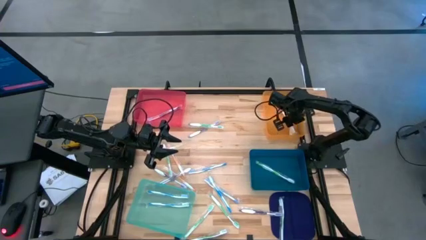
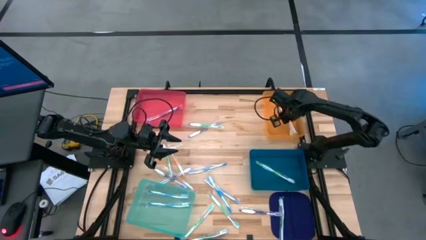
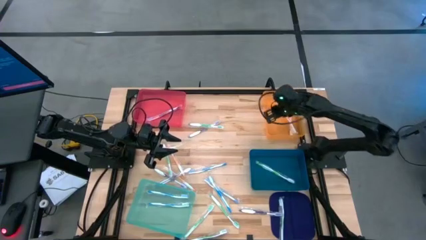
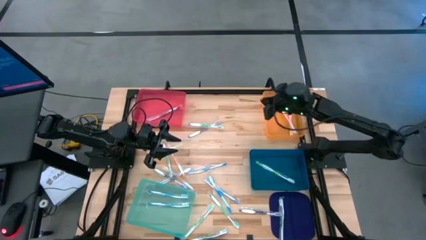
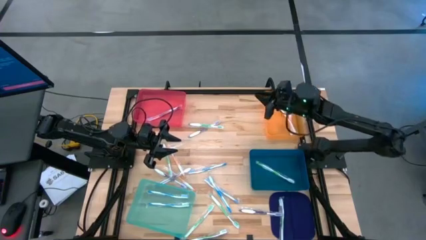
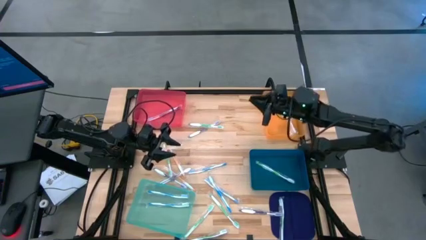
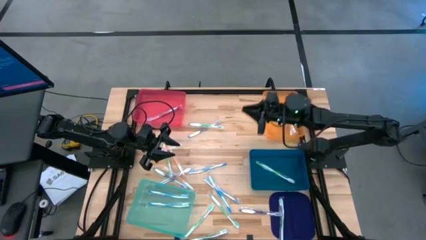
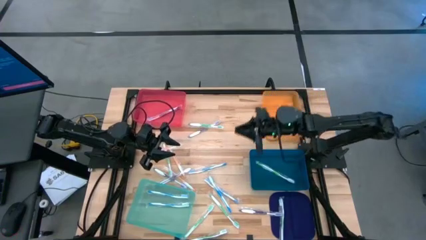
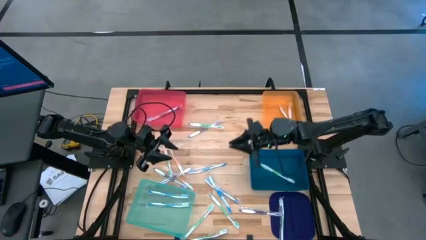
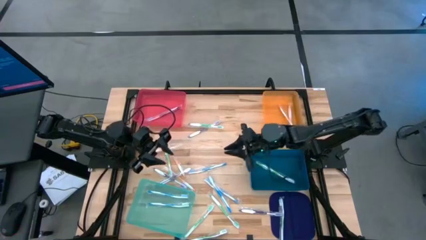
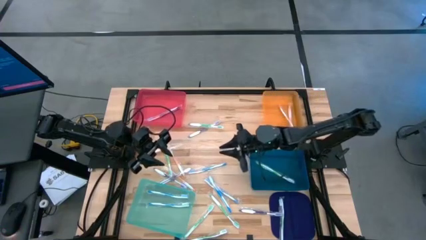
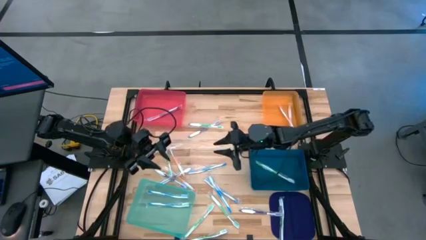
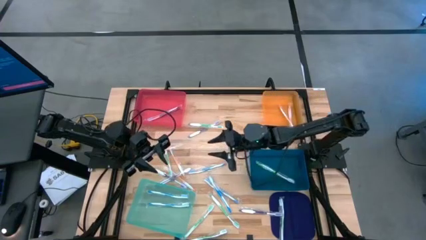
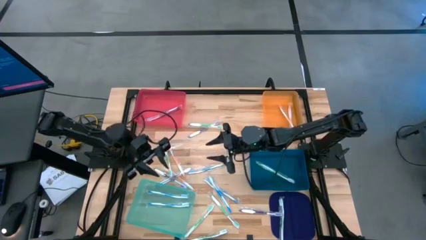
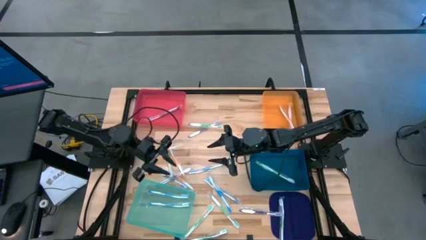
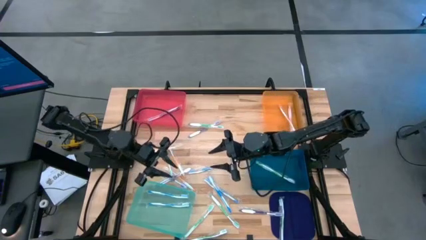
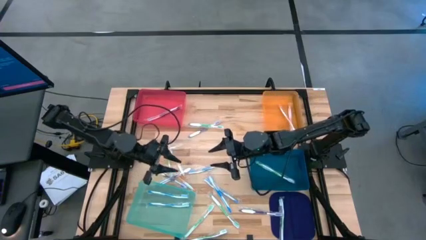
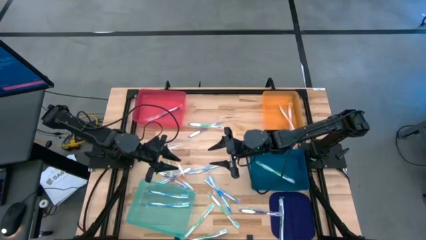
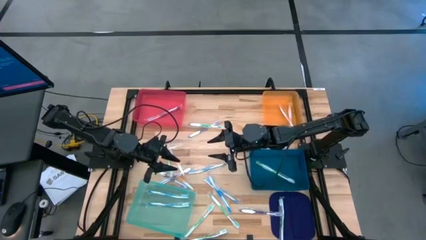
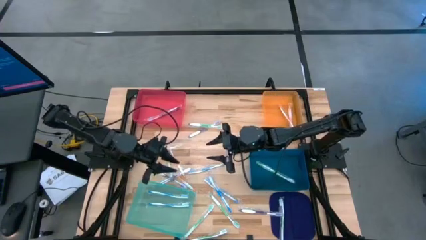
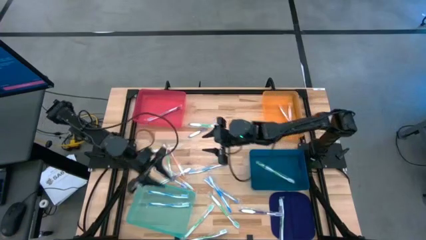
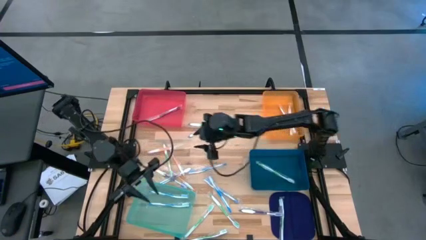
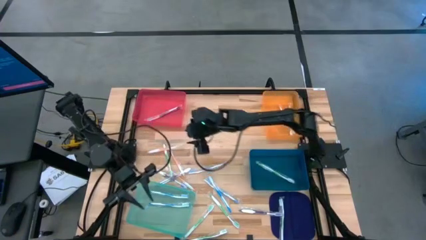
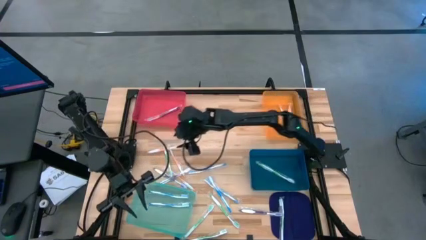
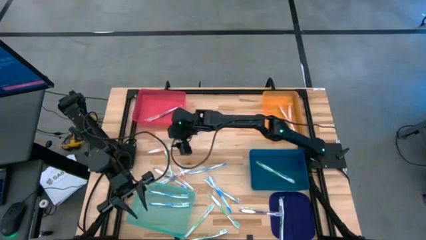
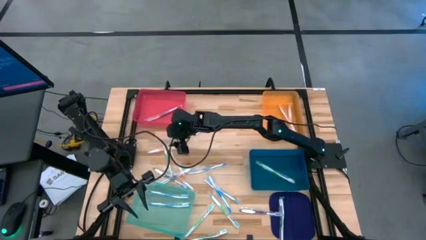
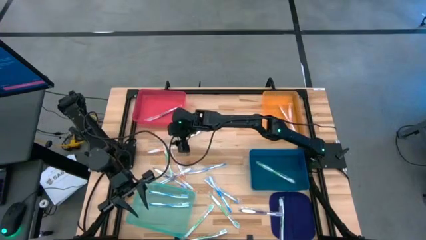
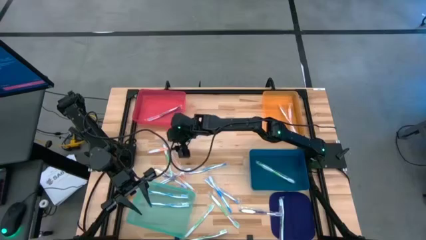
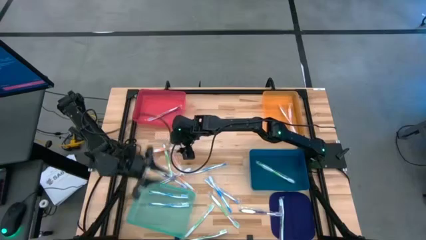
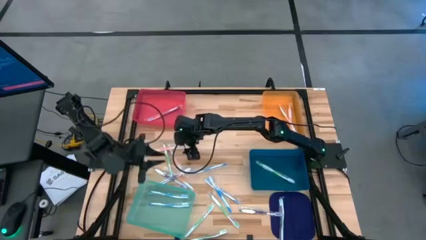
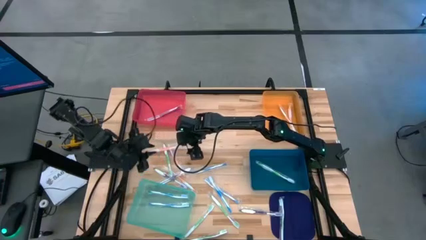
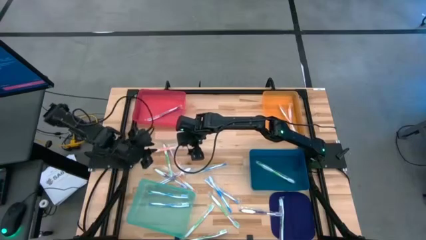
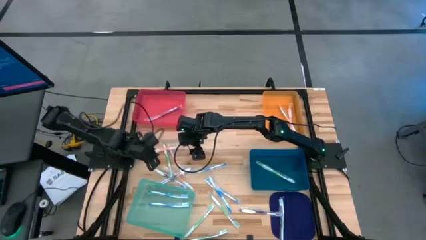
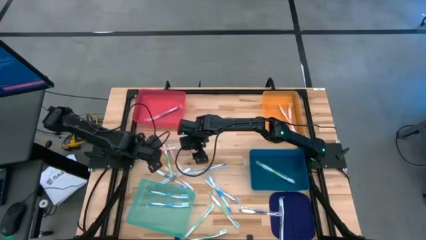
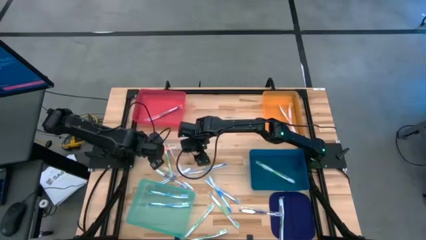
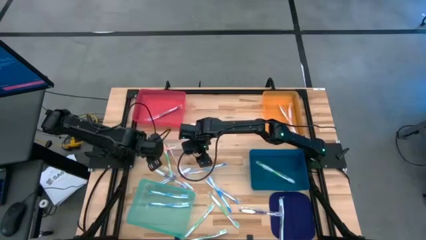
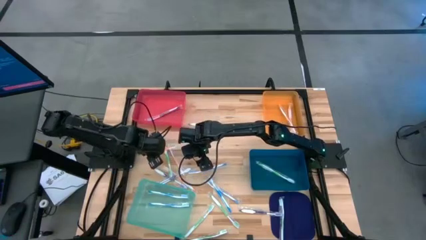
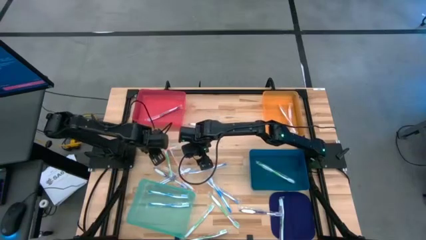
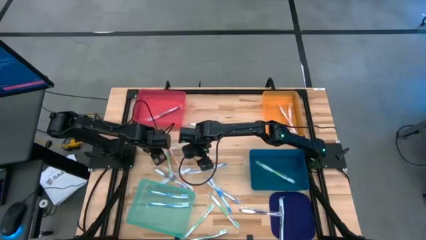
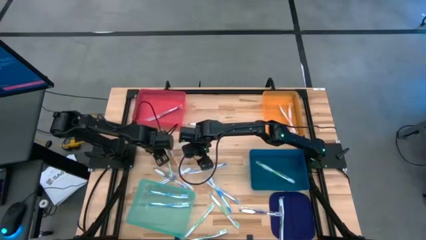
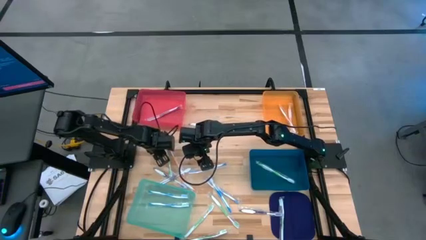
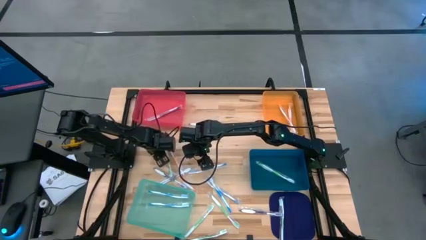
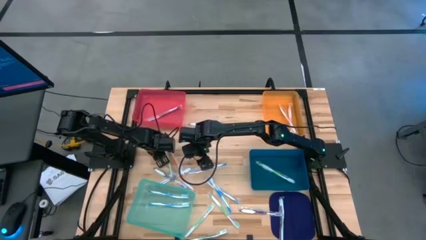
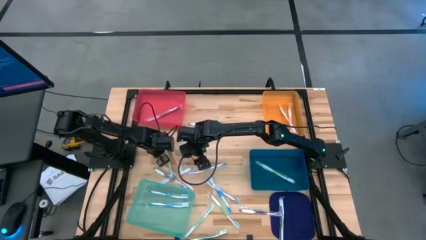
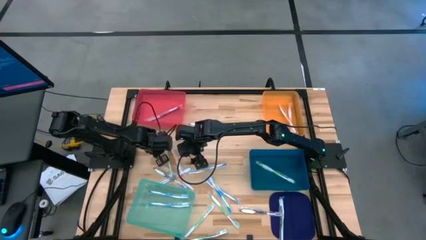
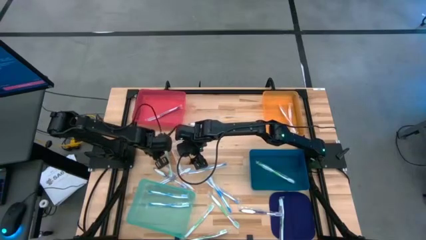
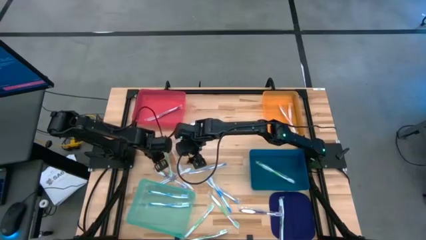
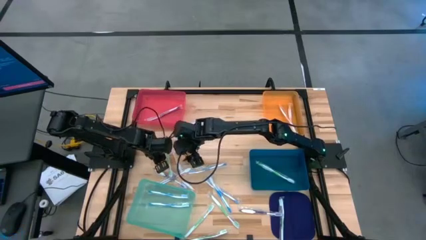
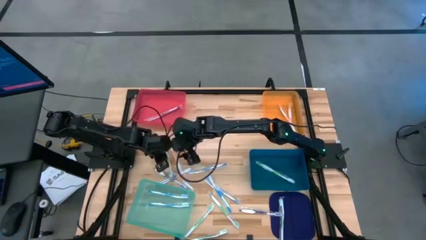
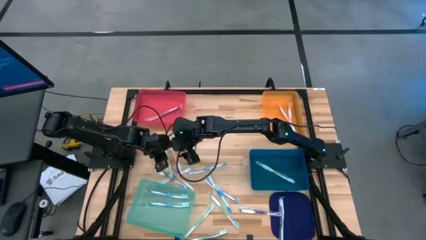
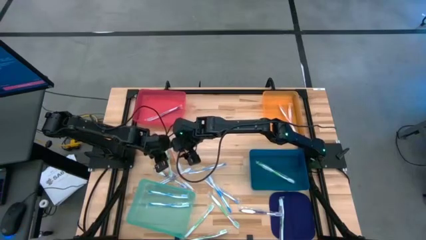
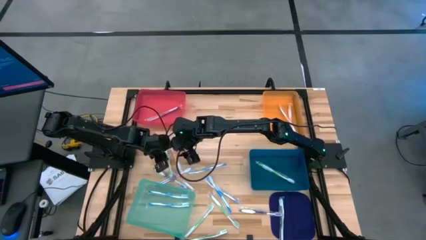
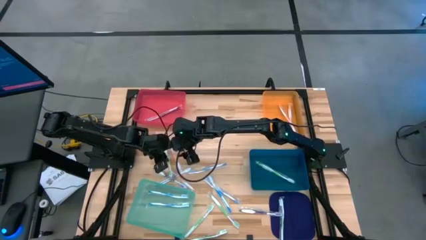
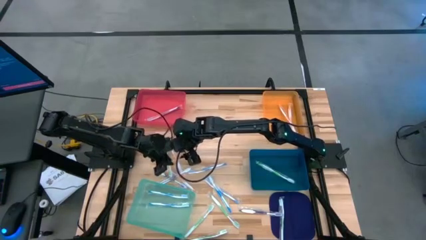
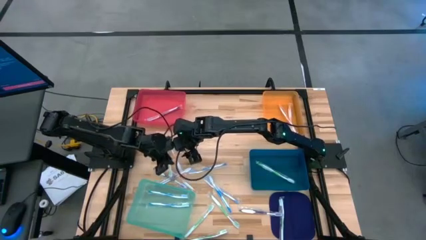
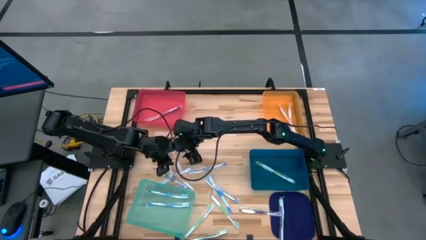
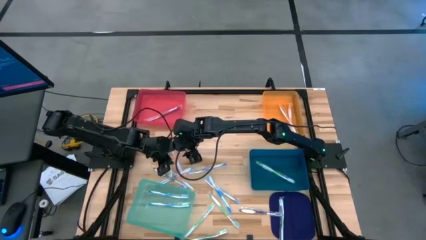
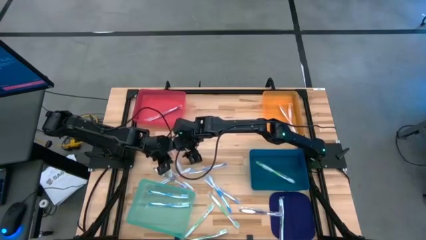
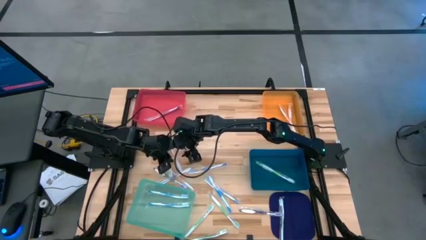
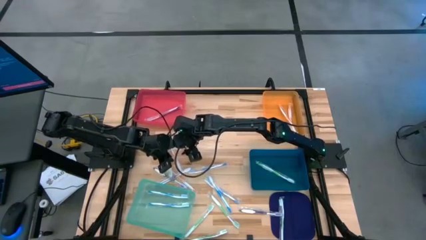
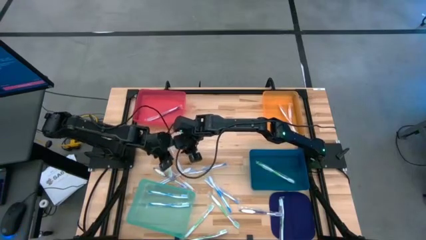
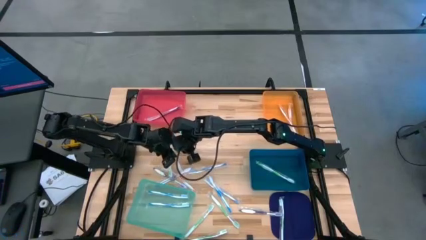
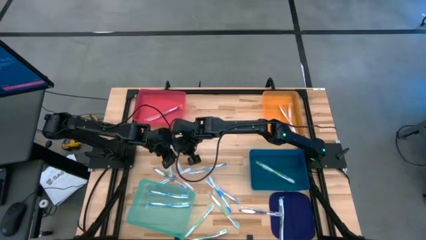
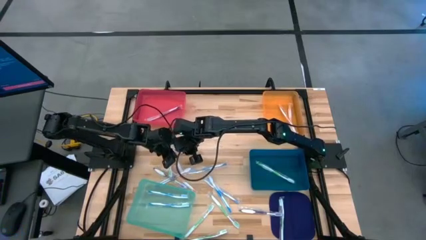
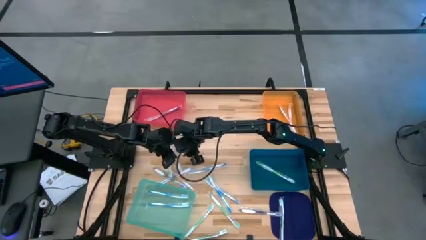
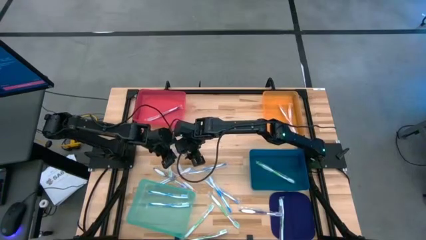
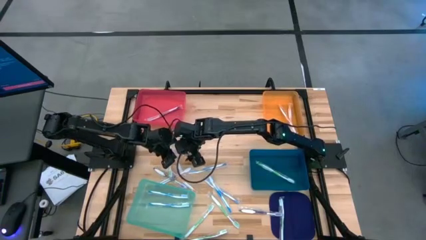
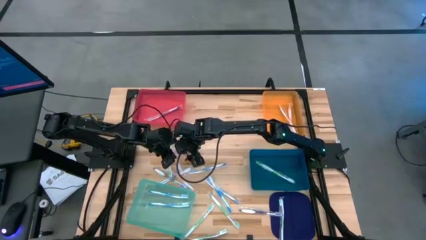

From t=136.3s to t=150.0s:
Task: Pick & Place Toothbrushes
Put the orange toothbrush into the orange bin

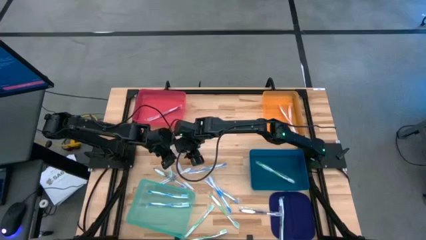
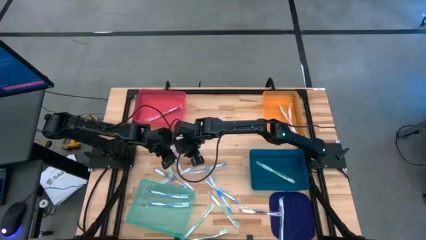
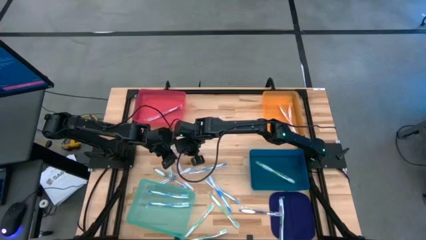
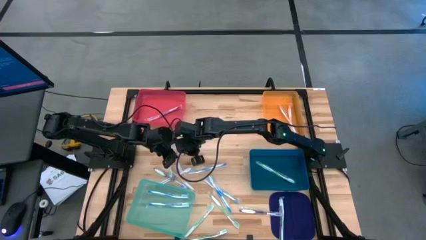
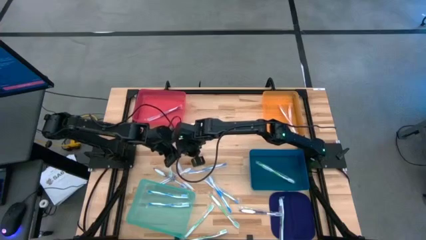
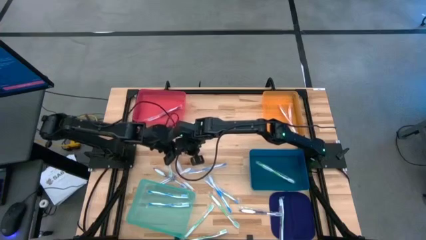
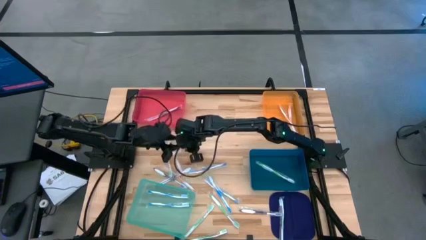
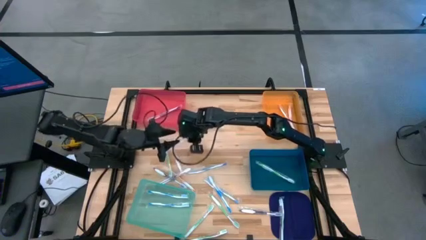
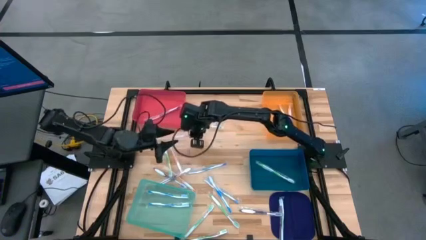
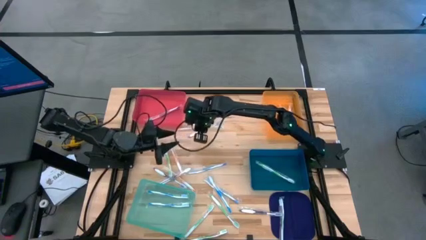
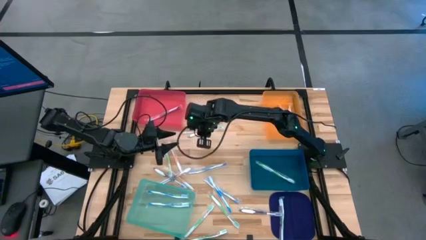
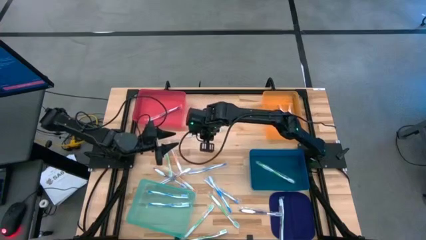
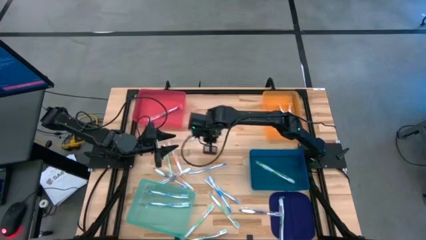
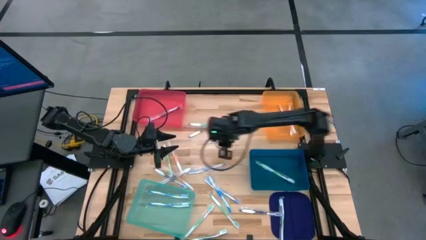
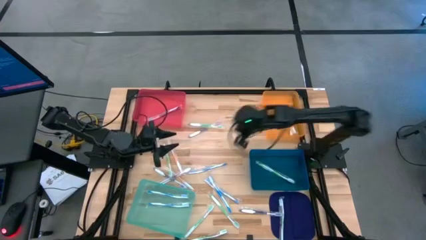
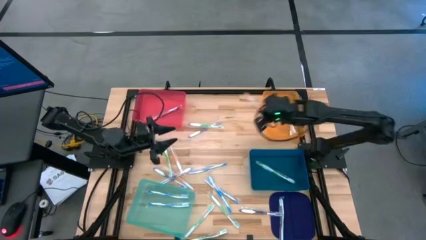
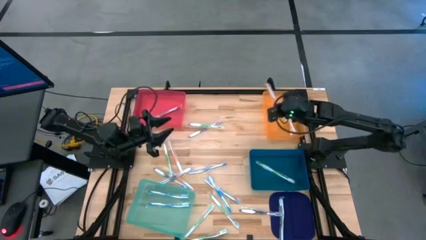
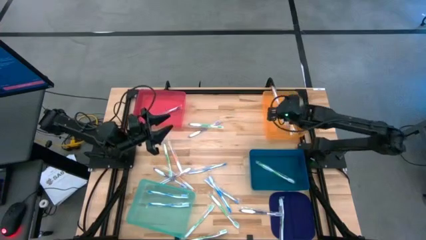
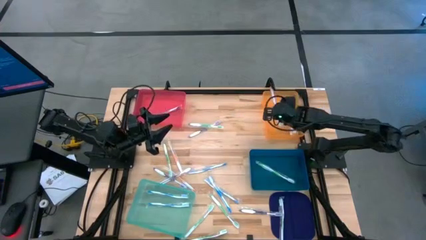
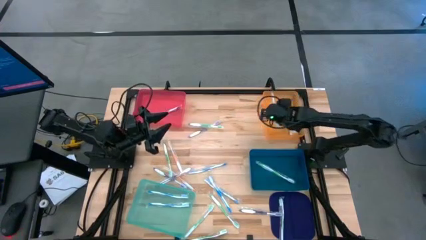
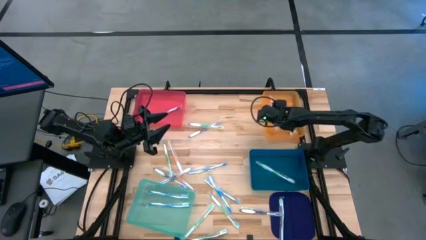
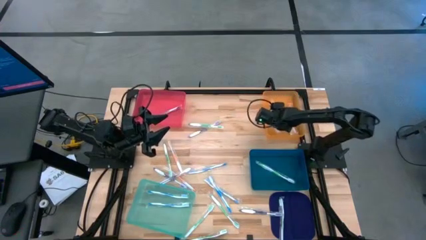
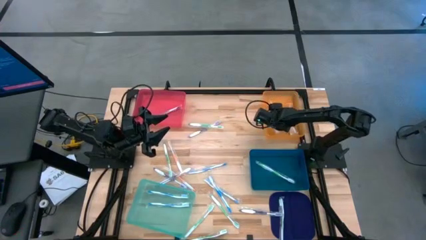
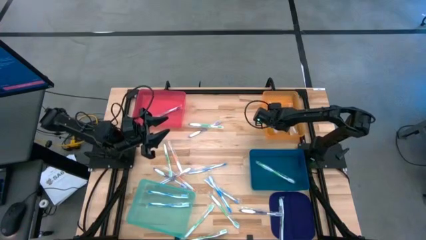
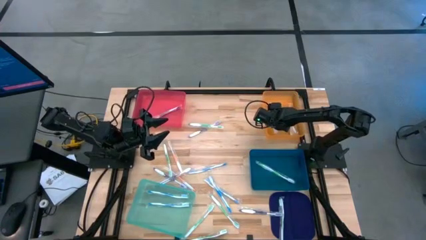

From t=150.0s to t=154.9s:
Put the orange toothbrush into the orange bin
